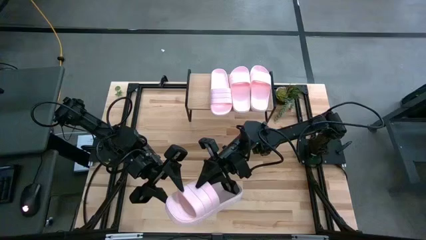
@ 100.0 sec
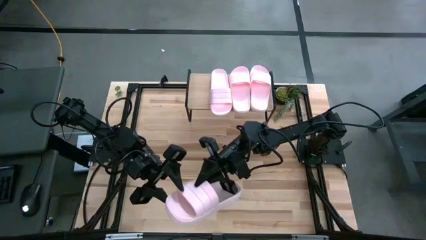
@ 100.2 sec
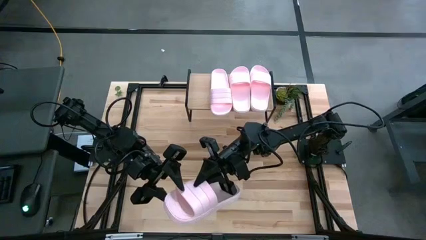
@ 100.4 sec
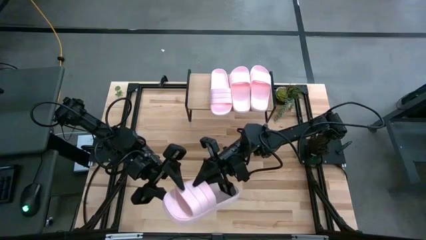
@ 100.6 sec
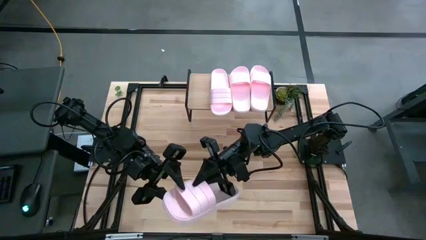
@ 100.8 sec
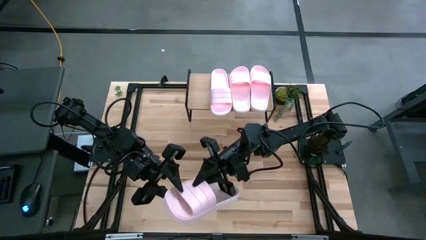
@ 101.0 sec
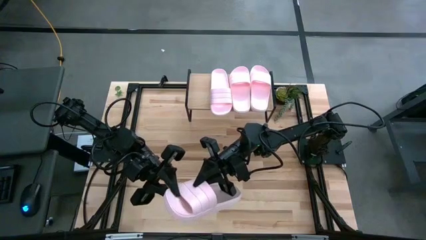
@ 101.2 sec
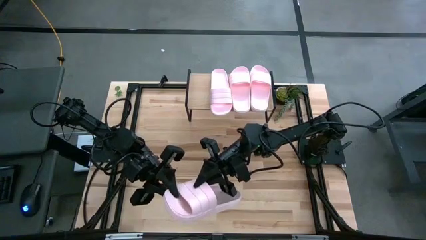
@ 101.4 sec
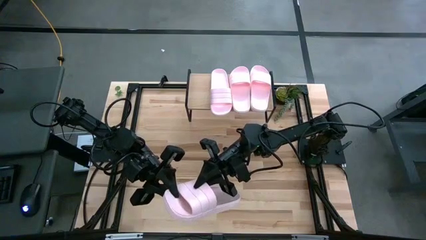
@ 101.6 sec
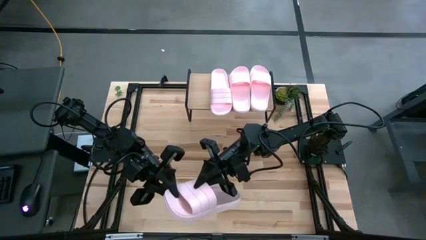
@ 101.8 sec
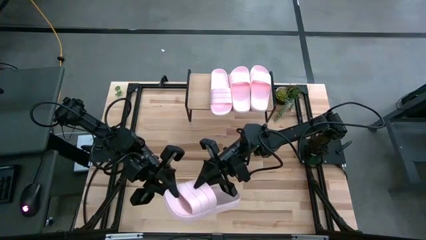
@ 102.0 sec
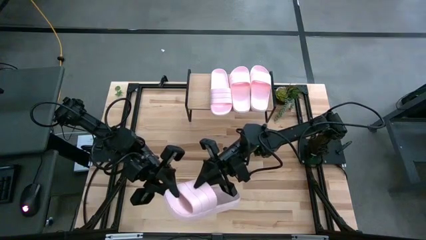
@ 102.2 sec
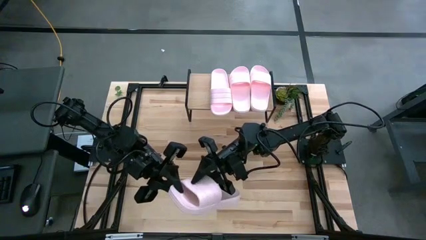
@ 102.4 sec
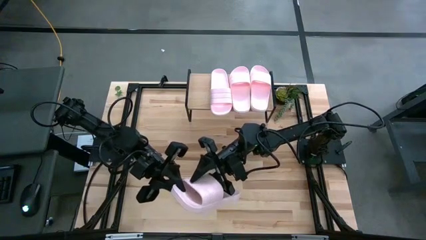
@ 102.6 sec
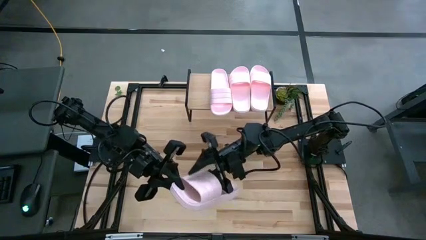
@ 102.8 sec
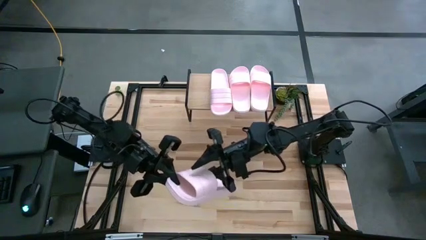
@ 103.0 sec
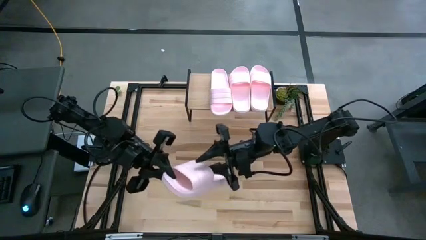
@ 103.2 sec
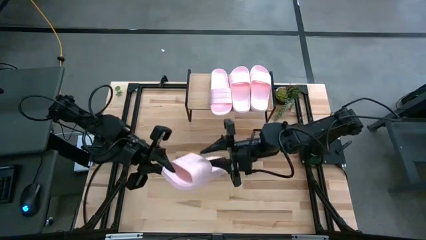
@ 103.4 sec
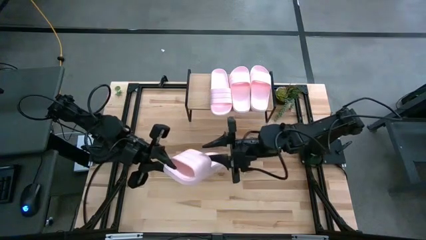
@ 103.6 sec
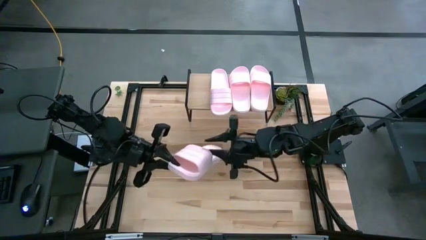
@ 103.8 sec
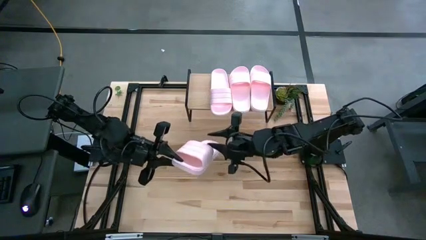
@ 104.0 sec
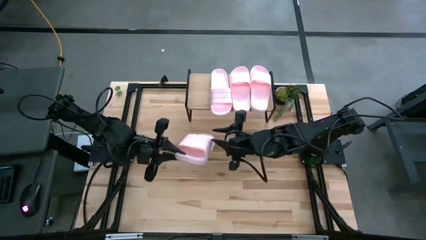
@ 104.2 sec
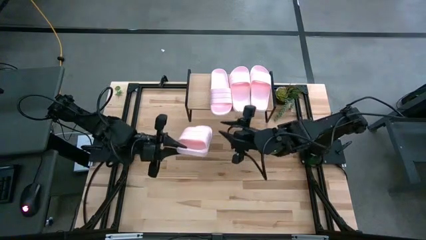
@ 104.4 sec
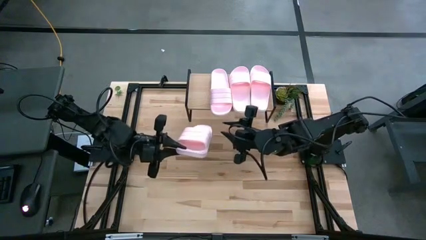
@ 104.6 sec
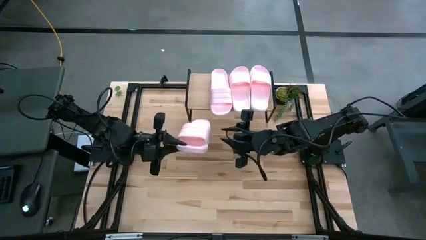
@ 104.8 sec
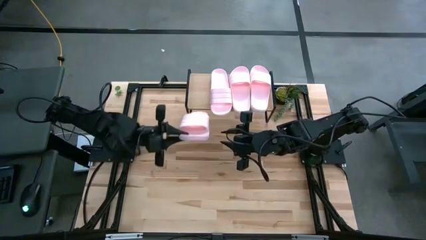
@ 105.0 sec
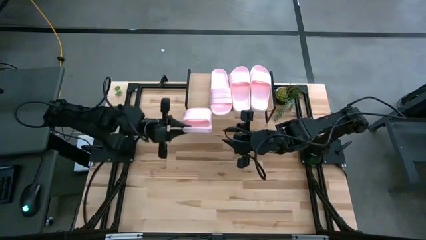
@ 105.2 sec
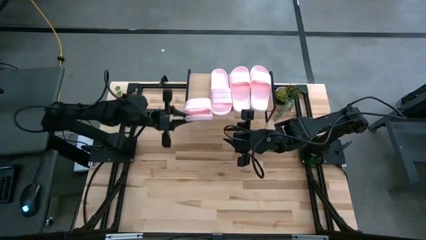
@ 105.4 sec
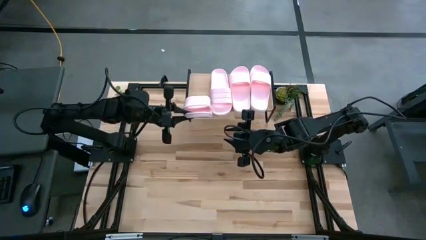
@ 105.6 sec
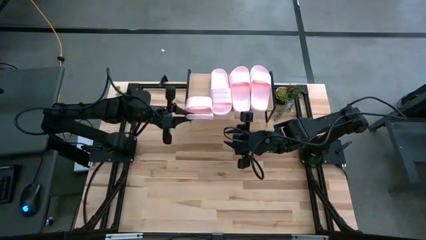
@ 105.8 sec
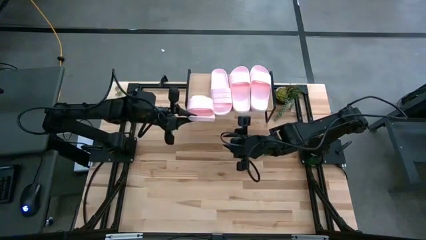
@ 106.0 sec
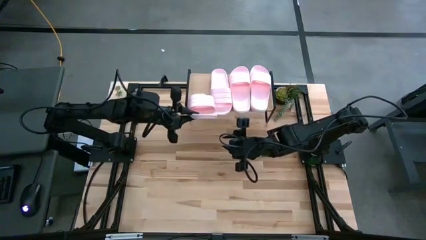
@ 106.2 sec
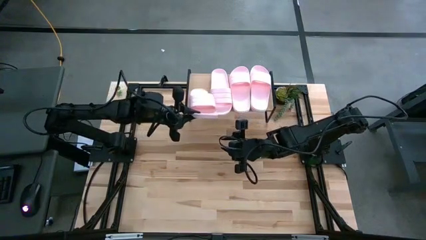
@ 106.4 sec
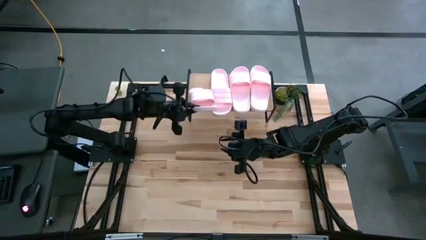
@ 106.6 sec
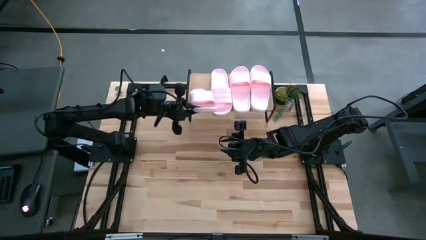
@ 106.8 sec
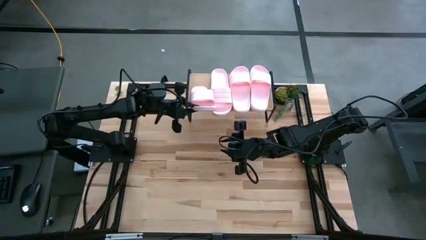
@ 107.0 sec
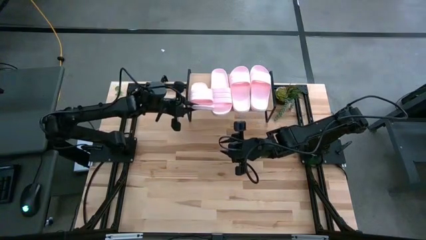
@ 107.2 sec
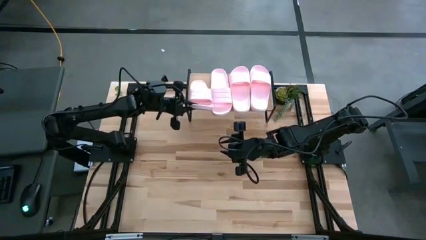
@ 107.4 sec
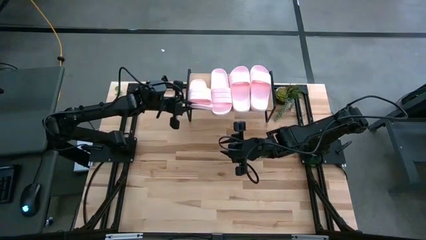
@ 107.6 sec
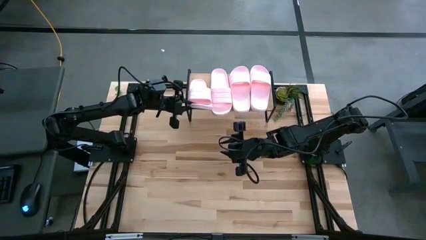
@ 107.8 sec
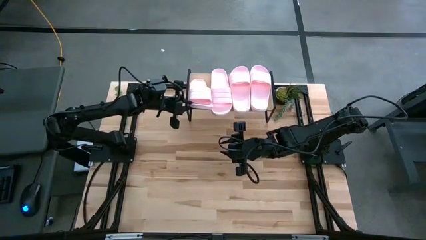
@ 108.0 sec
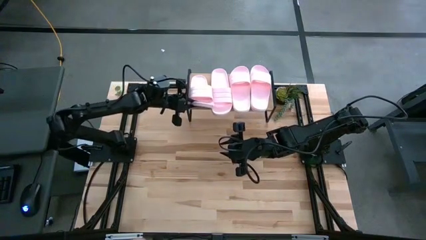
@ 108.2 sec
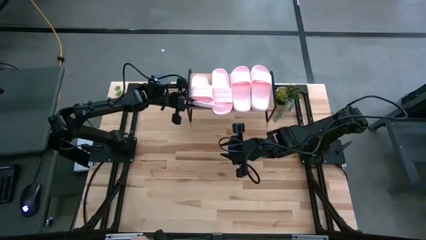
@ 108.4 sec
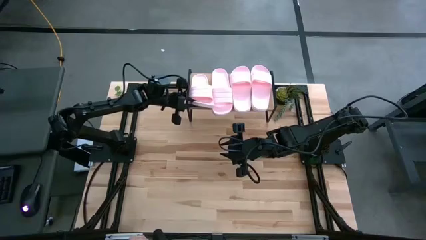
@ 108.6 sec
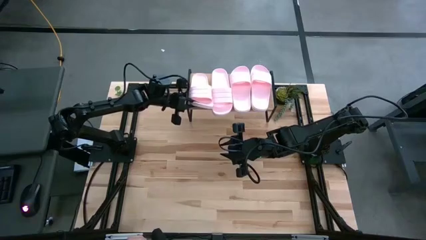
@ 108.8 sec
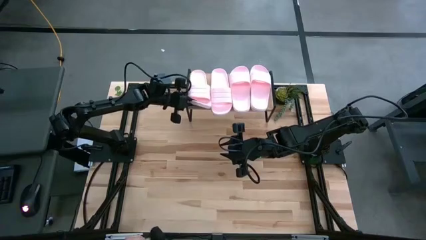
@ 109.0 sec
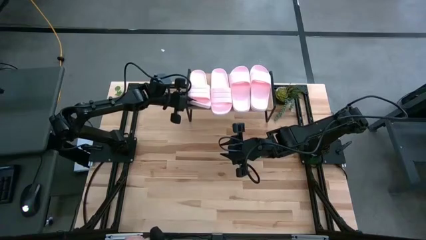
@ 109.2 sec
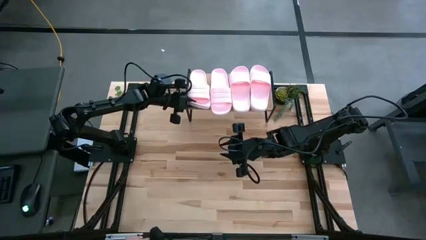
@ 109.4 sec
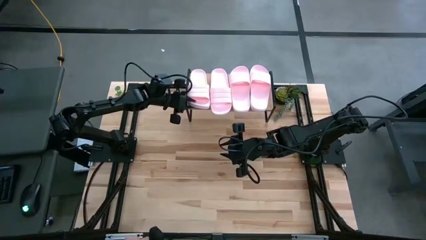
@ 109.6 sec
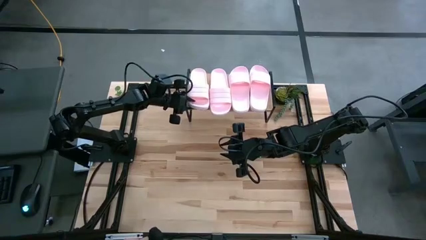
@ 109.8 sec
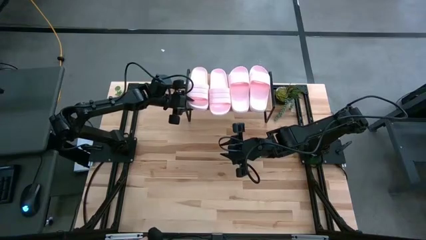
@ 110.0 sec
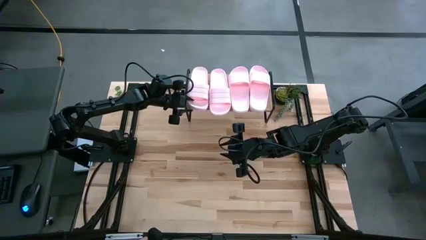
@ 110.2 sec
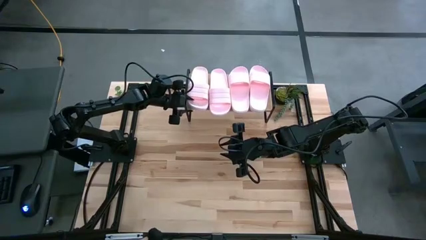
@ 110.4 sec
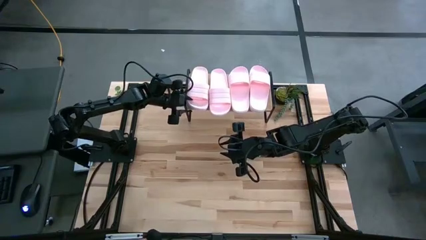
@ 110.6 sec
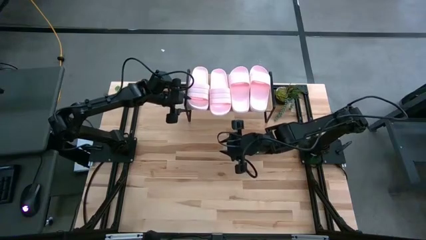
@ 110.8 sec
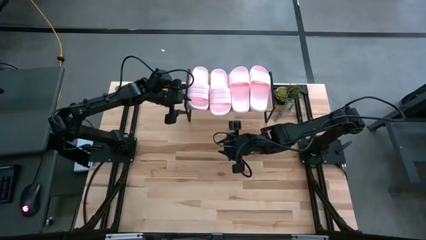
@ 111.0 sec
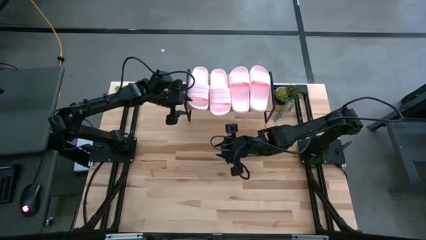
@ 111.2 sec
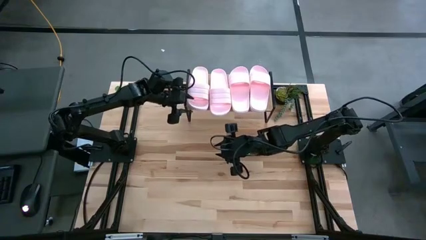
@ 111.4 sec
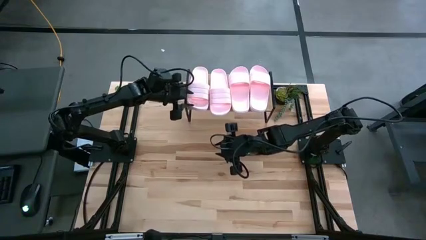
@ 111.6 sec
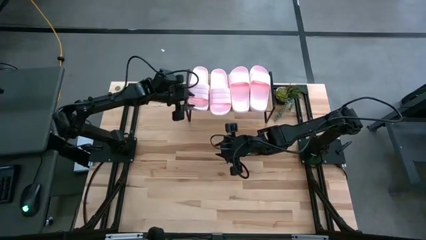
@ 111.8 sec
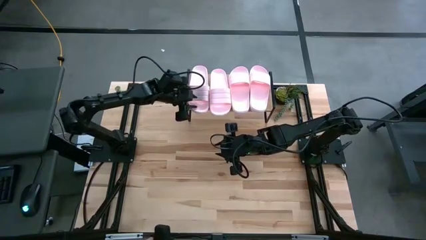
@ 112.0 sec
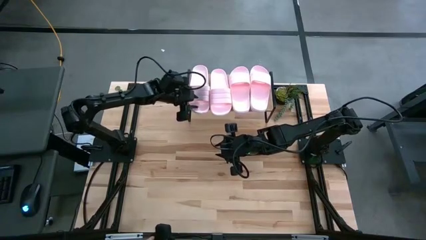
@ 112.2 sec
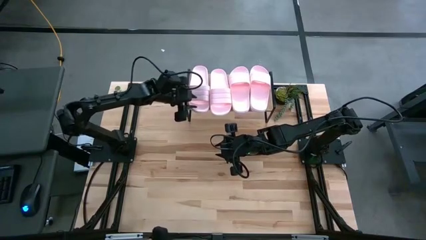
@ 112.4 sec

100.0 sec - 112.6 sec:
Task: Pick and place slides into the shelf
Put the pink slide on the shelf

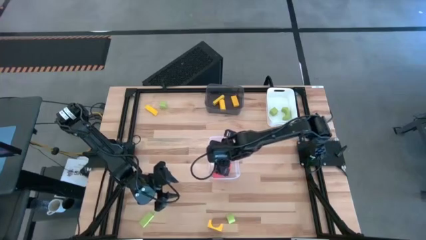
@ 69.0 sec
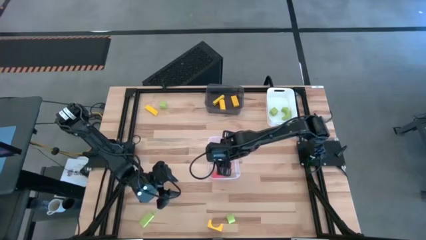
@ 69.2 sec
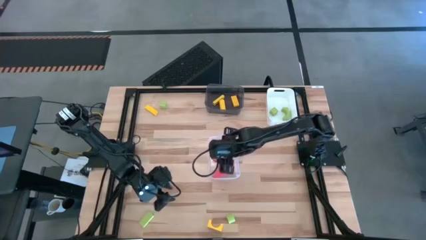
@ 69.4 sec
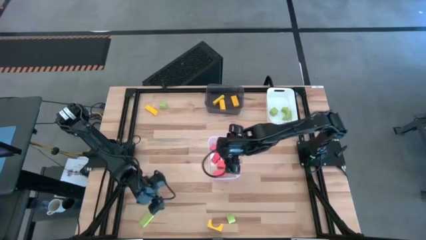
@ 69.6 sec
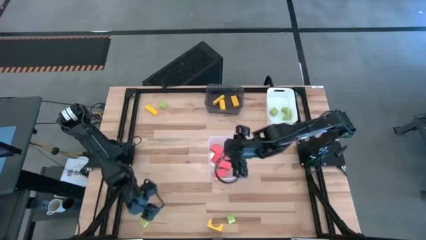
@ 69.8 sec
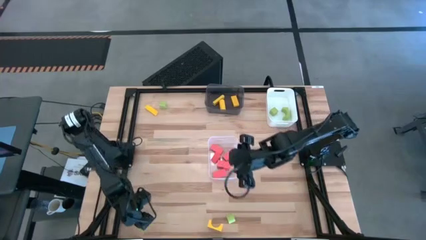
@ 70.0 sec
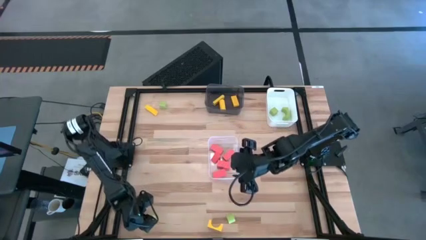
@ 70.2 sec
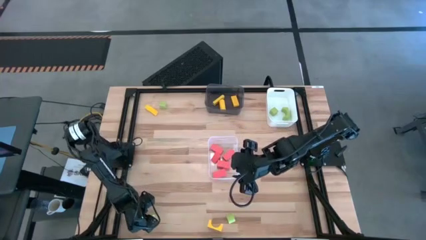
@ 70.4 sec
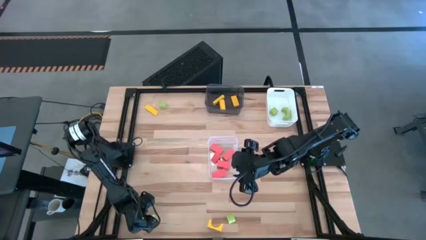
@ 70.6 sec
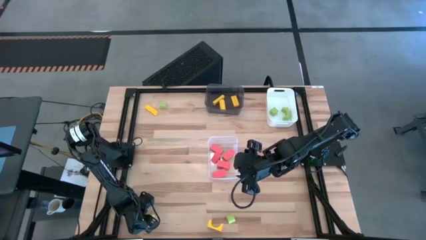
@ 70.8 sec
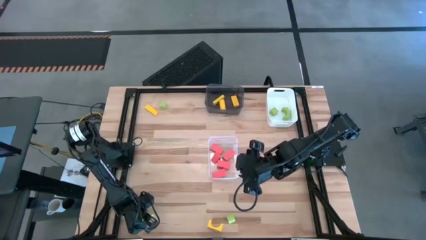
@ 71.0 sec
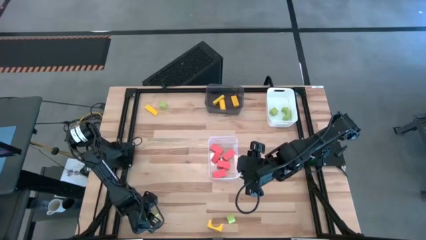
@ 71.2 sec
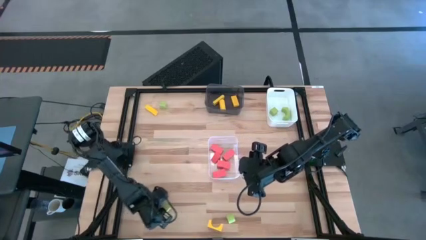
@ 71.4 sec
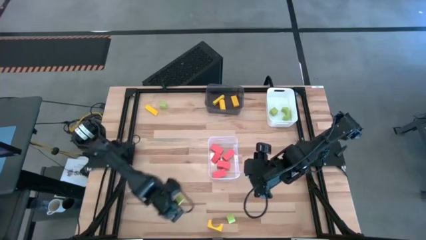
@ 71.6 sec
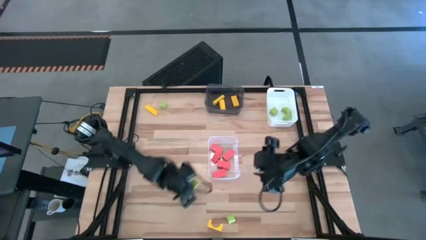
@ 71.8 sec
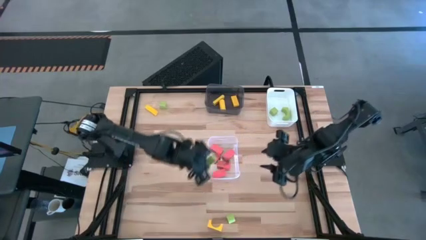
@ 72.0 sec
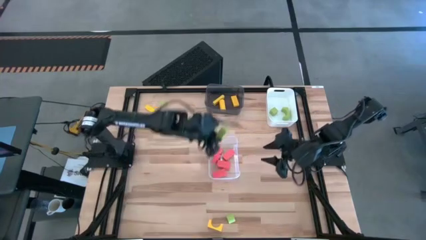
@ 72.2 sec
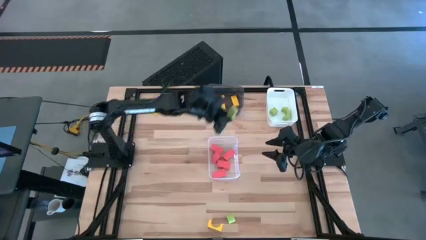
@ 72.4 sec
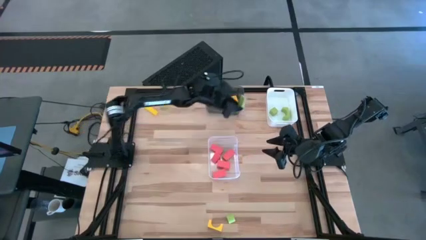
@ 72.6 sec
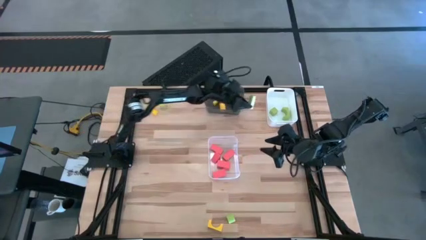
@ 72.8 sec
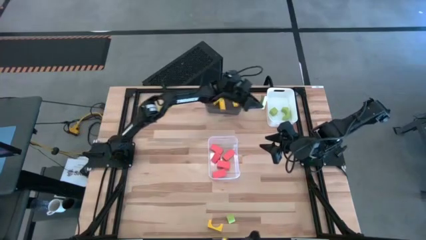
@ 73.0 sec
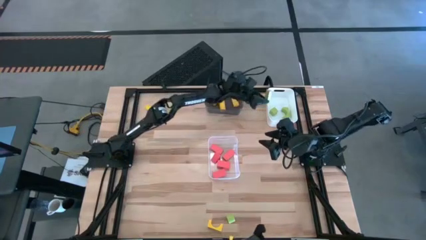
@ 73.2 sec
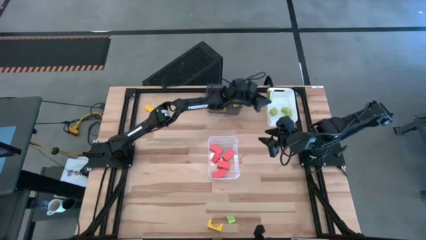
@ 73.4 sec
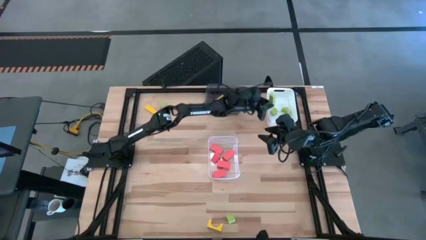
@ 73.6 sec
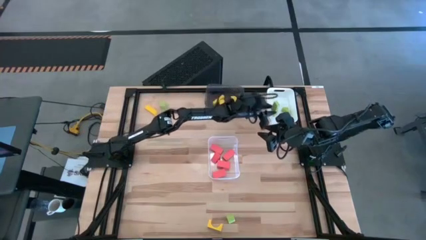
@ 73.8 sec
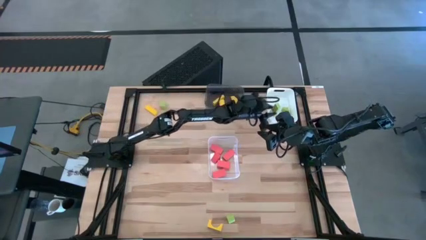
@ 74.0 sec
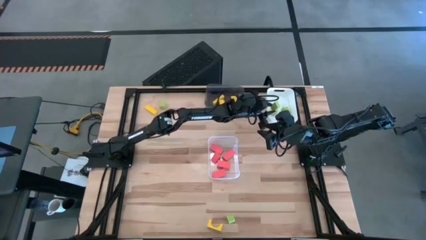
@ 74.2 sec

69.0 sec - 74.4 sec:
Task: Sort & place blocks by color
Put the green block into the white bin
